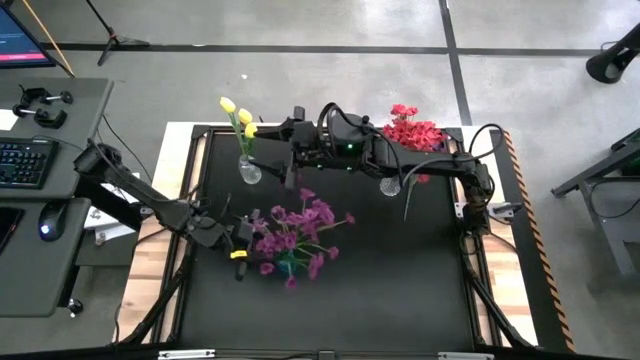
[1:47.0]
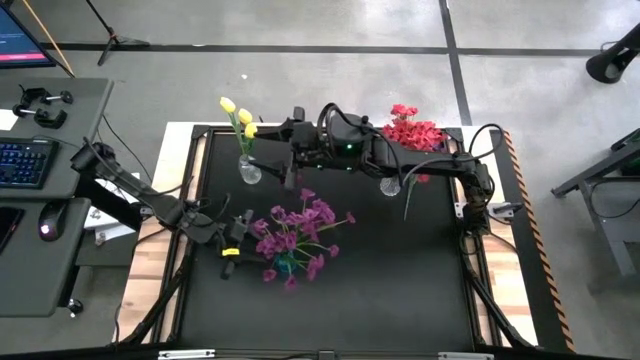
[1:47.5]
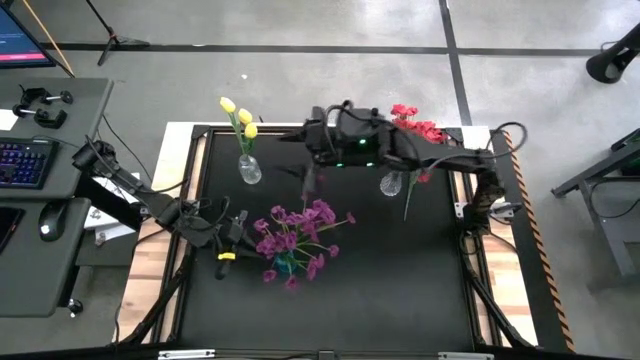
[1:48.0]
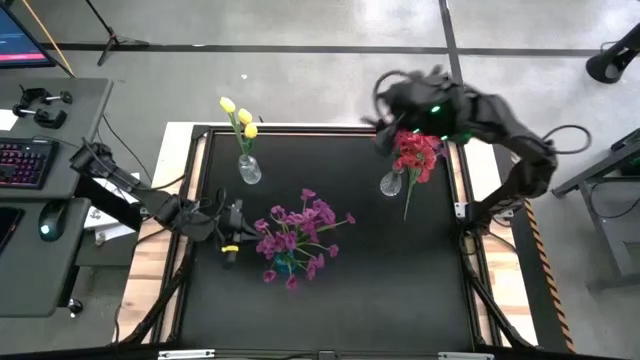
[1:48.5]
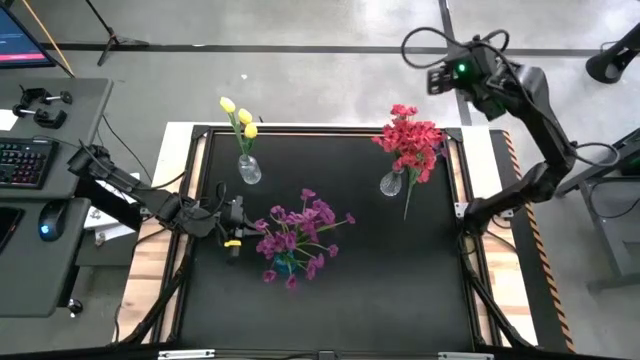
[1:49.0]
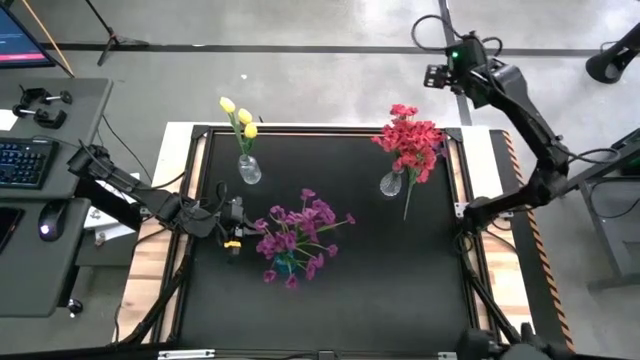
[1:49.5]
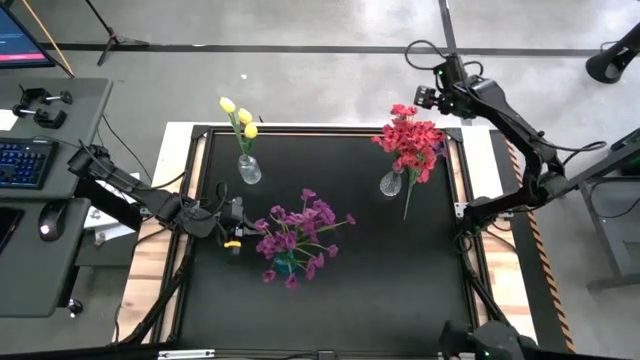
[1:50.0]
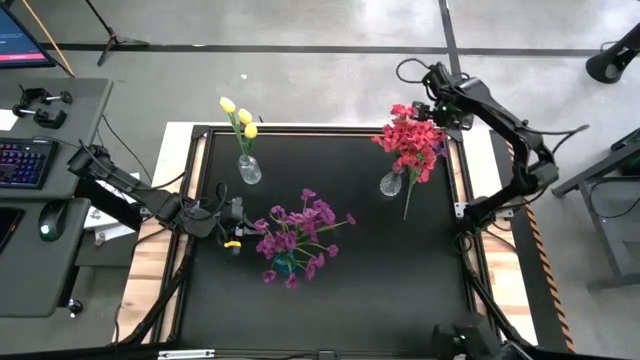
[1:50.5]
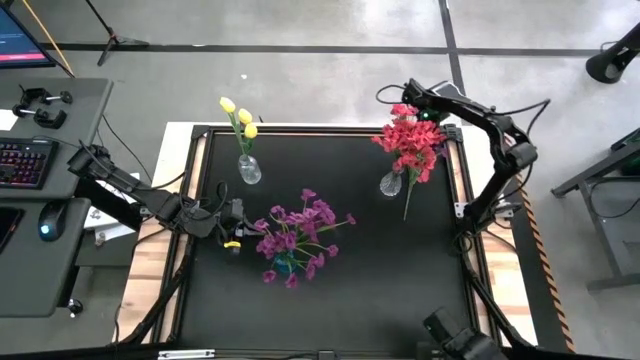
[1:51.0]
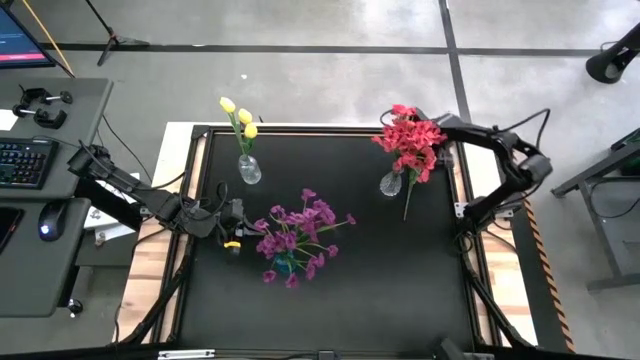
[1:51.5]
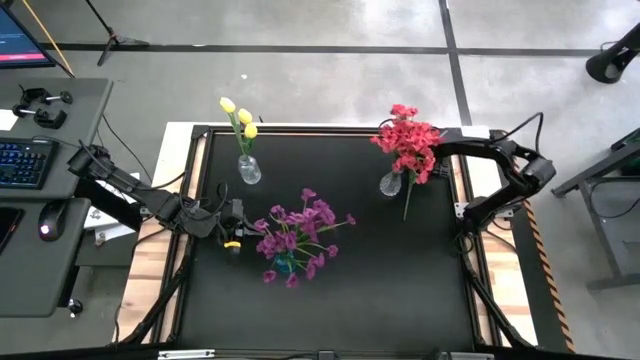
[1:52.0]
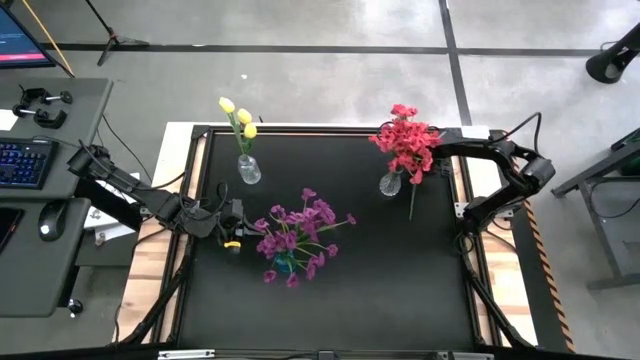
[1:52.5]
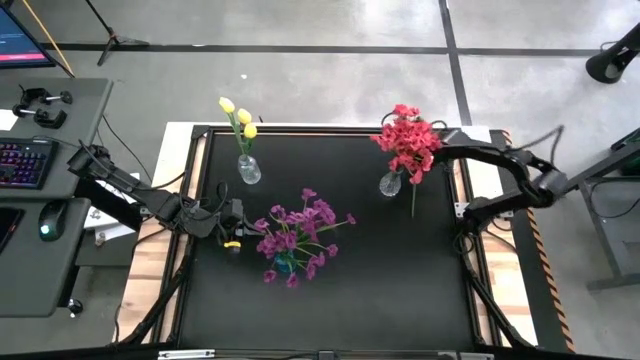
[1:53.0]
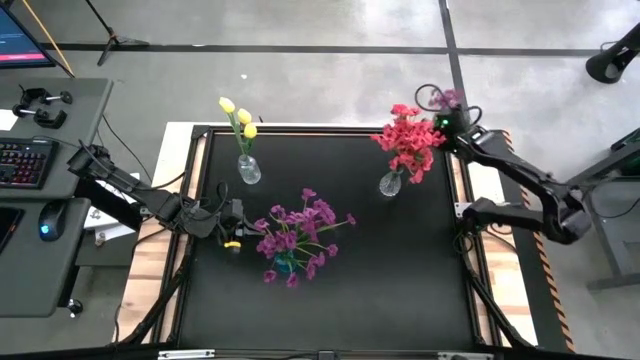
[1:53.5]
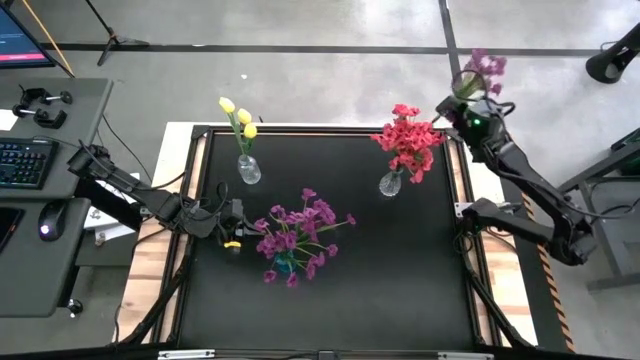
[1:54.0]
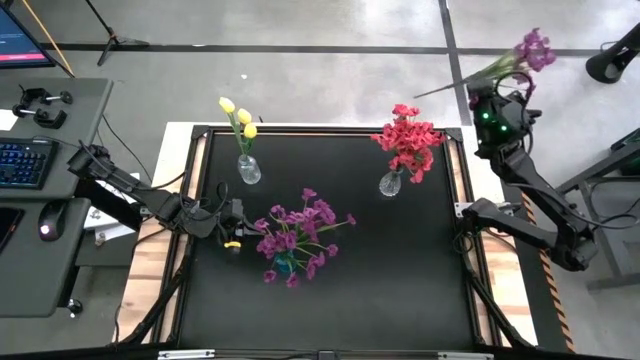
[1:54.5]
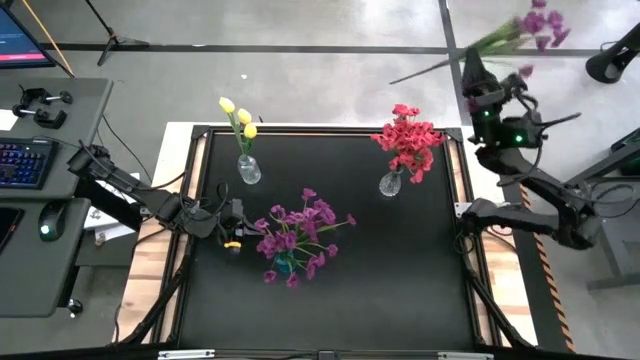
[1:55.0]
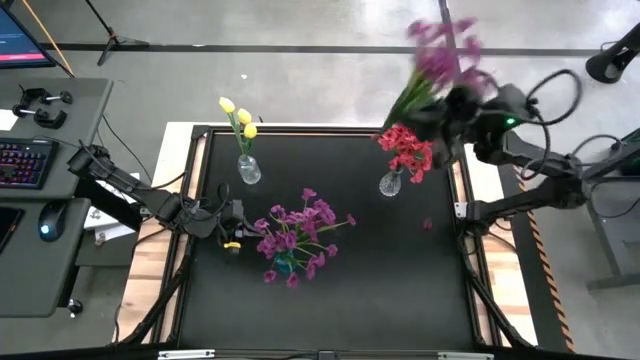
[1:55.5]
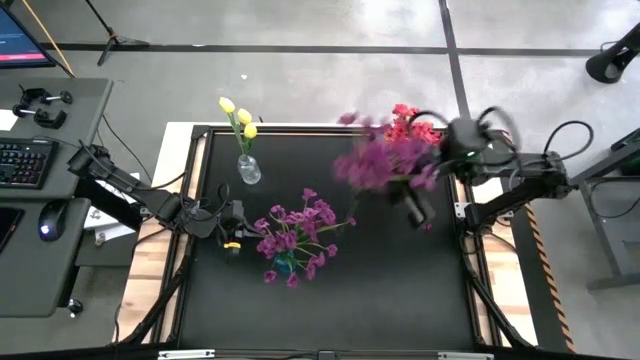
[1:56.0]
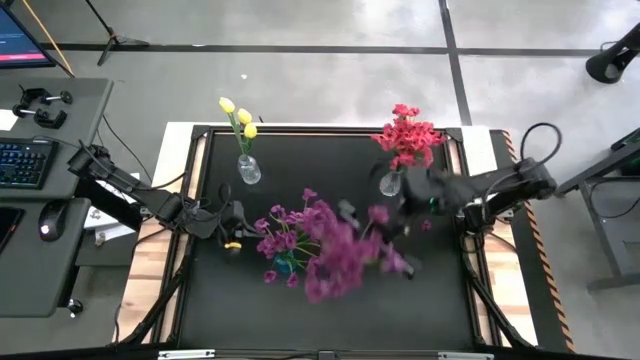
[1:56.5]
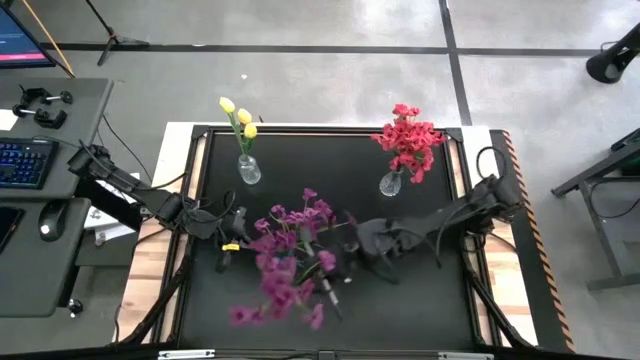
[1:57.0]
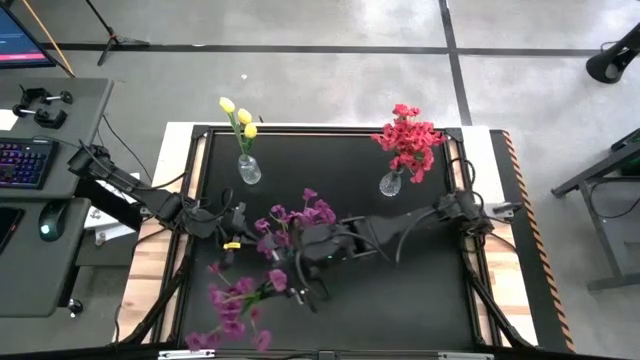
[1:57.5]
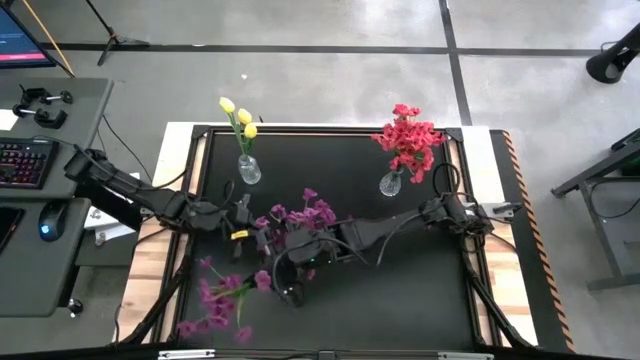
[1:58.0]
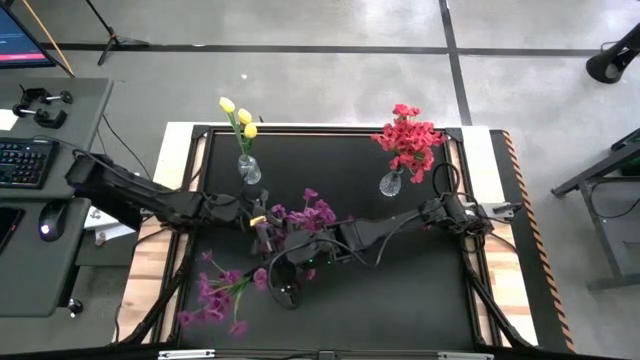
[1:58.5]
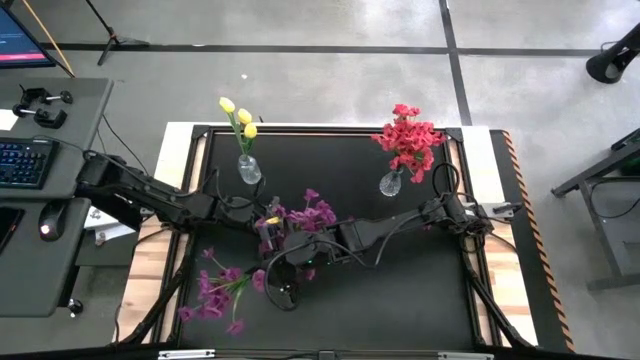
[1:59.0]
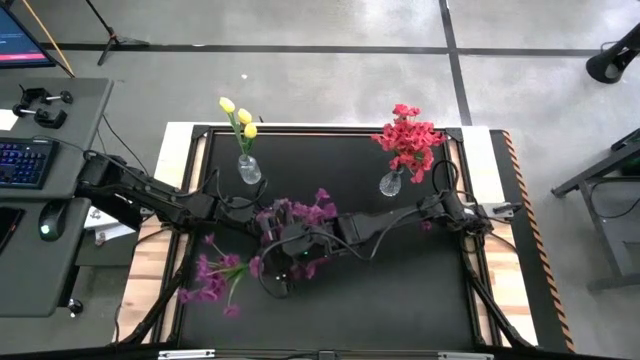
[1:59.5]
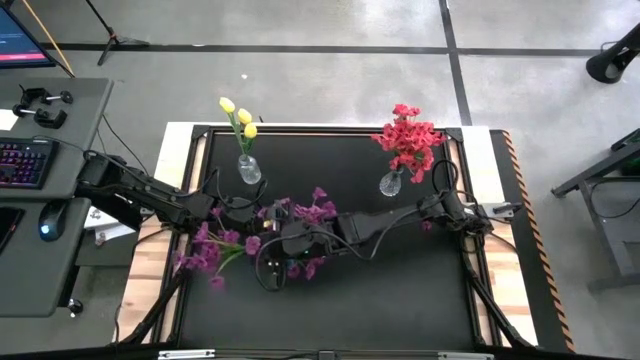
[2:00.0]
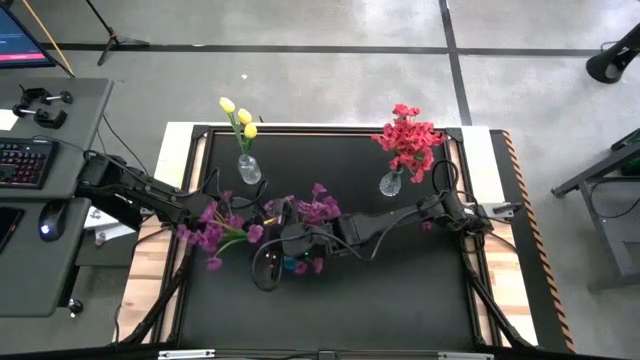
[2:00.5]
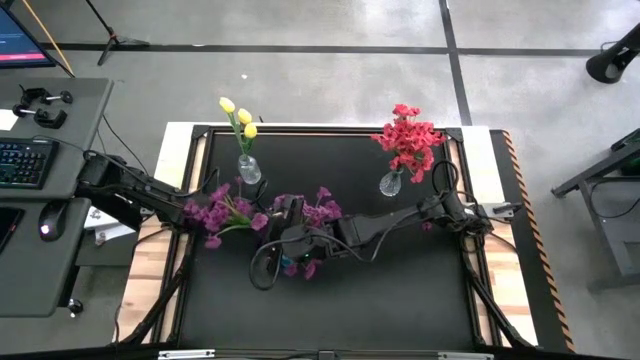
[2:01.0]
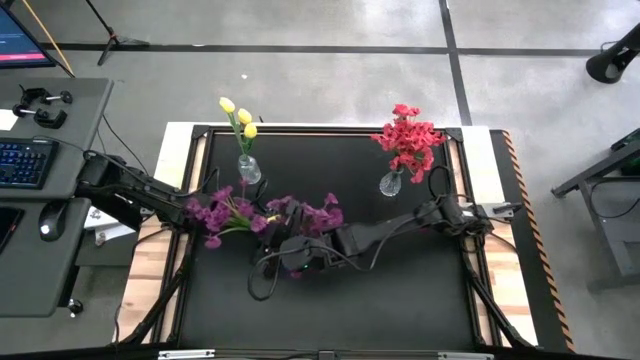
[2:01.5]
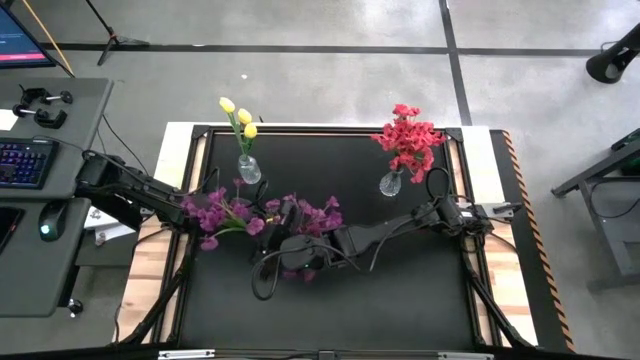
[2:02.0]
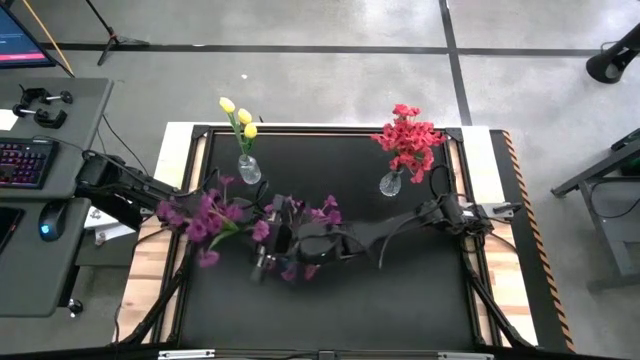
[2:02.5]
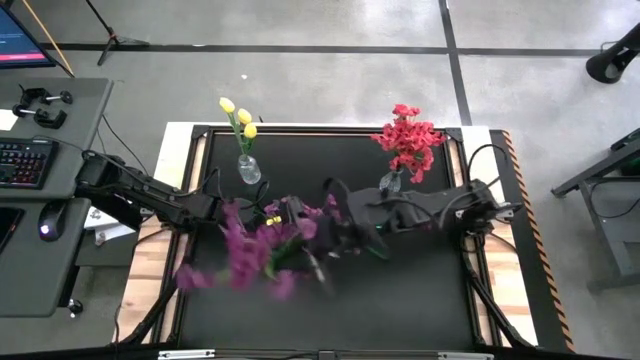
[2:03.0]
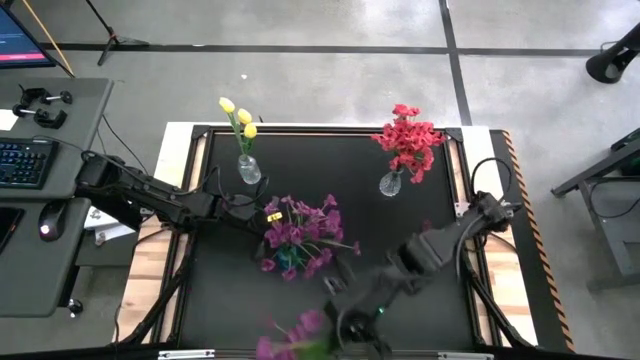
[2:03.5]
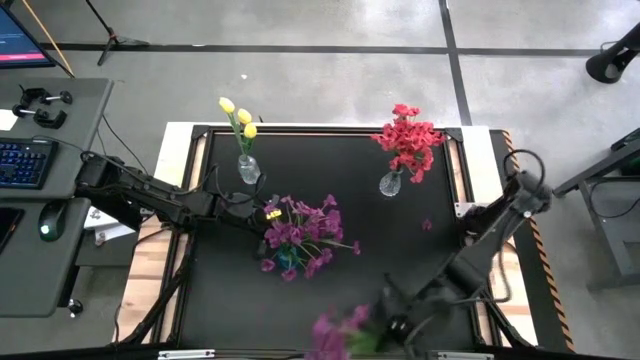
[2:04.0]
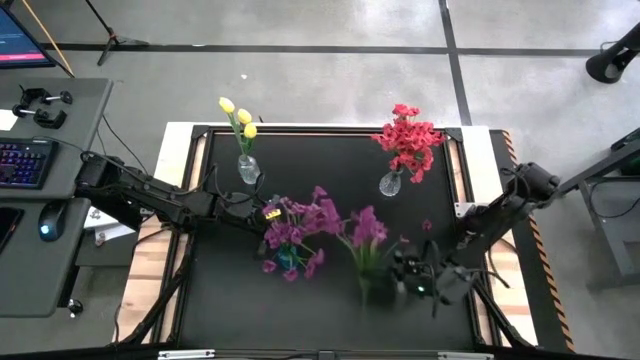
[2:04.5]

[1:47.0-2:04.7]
Task: Sort flowers into vase by color
Put the violet flowers into the blue vase

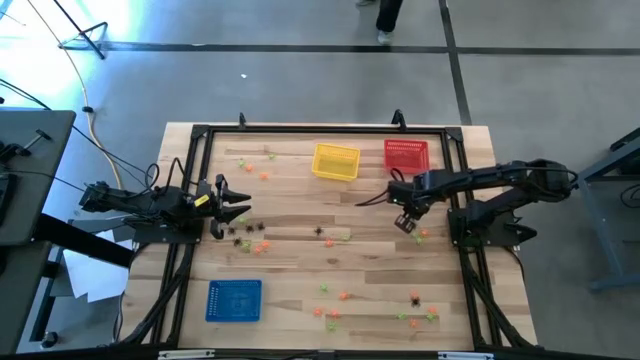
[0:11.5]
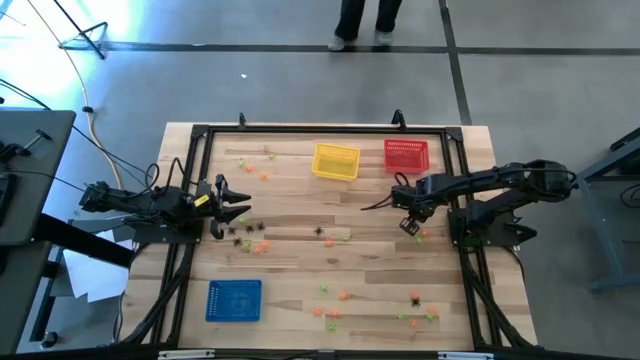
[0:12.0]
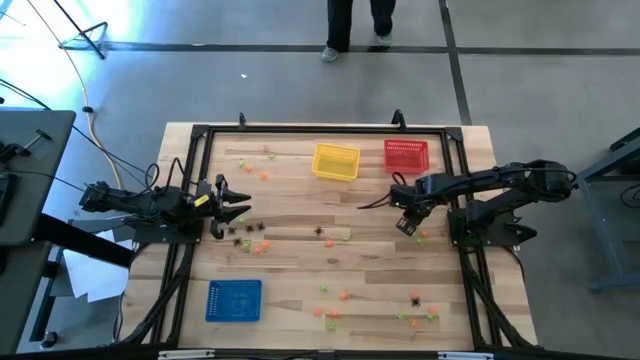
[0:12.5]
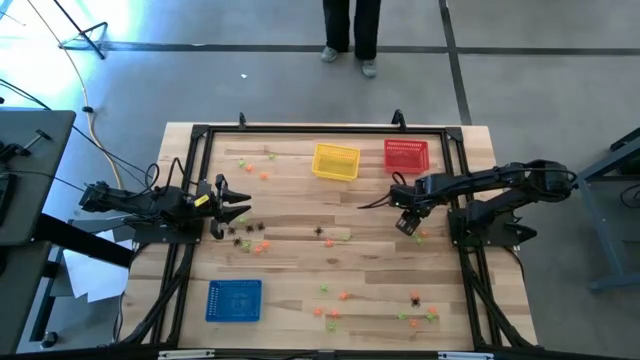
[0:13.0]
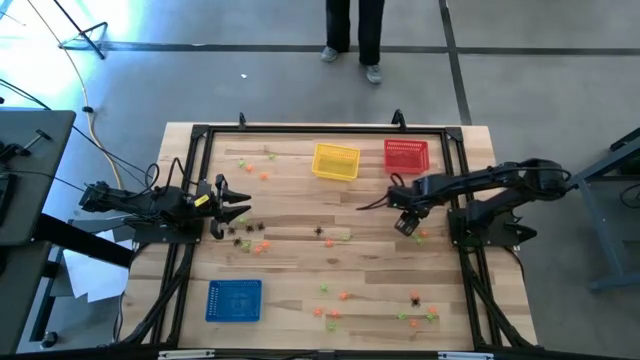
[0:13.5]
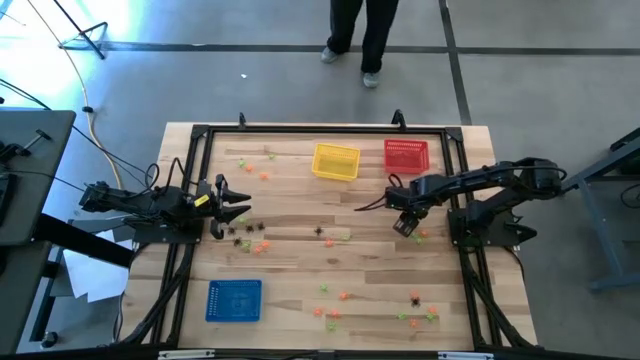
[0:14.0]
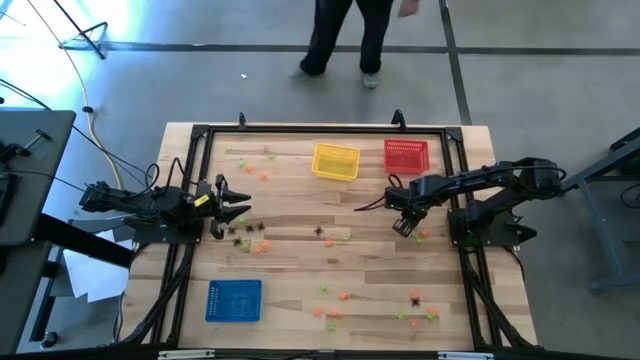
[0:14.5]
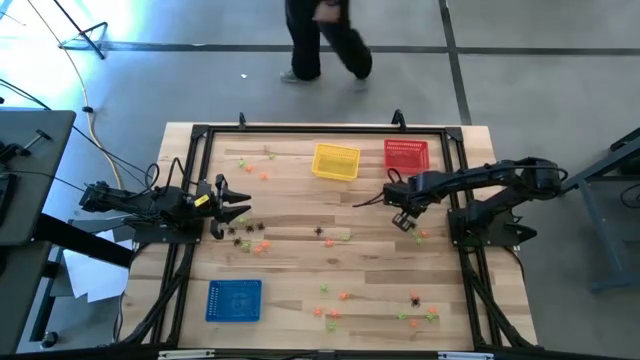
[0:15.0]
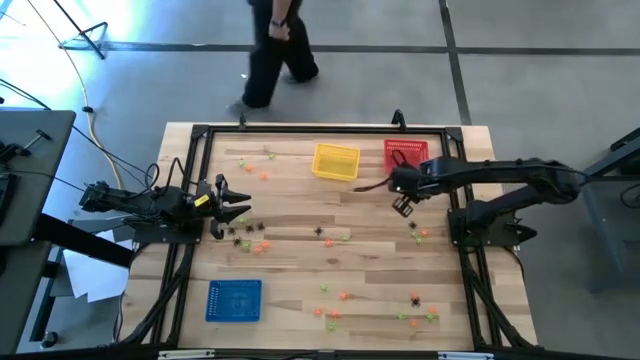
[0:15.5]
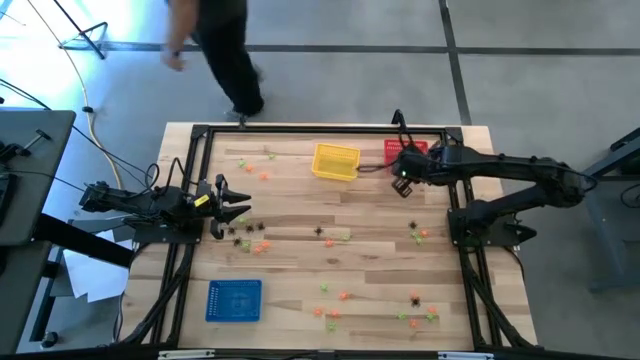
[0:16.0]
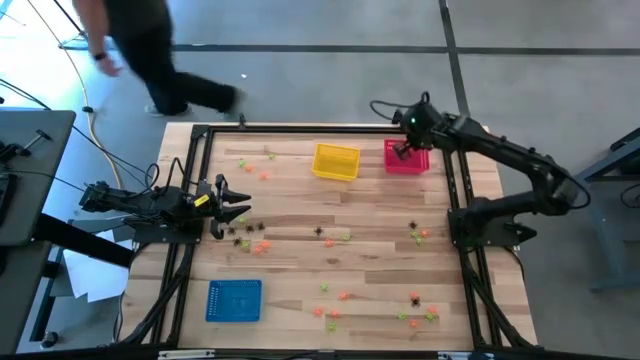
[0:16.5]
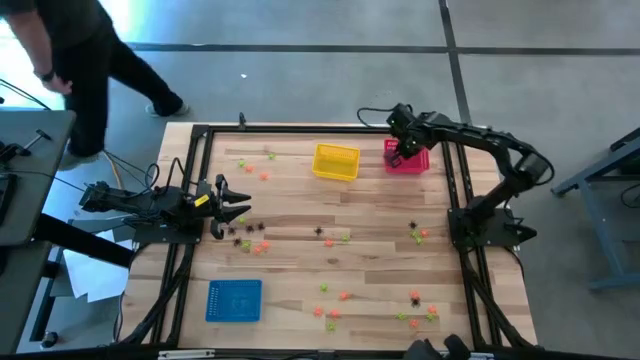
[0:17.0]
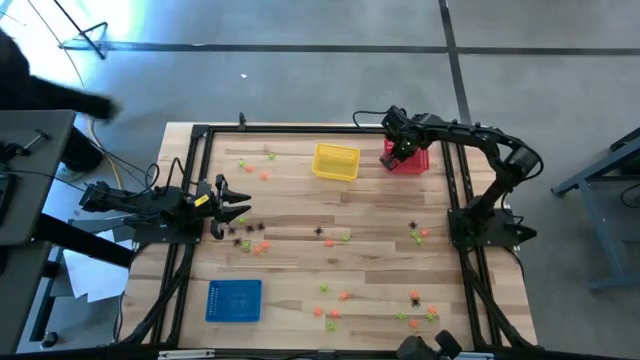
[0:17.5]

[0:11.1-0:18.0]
Task: Sort Halloween decoration
Put the black spider toy into the red bin
